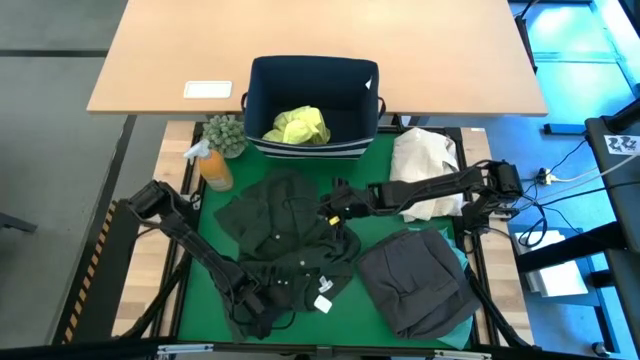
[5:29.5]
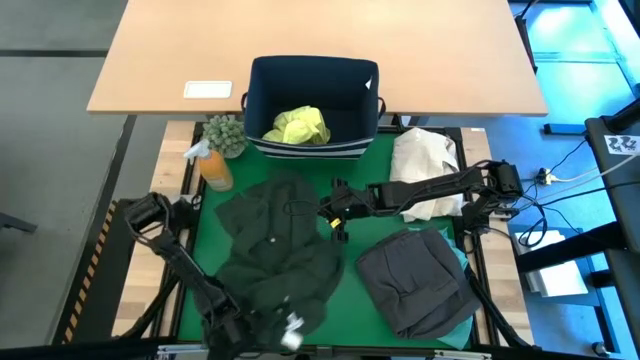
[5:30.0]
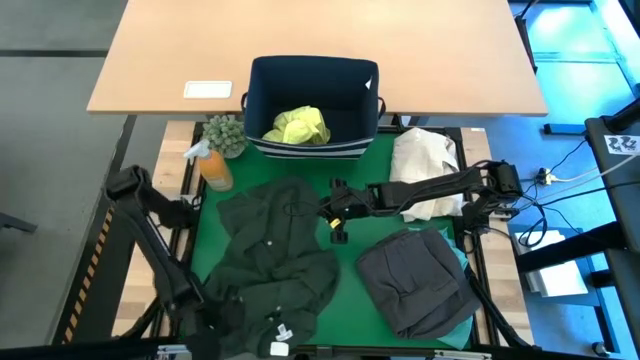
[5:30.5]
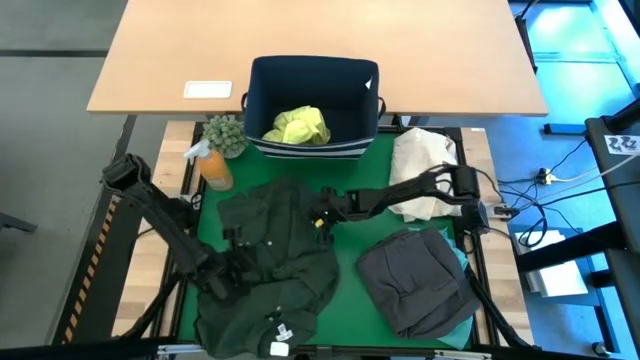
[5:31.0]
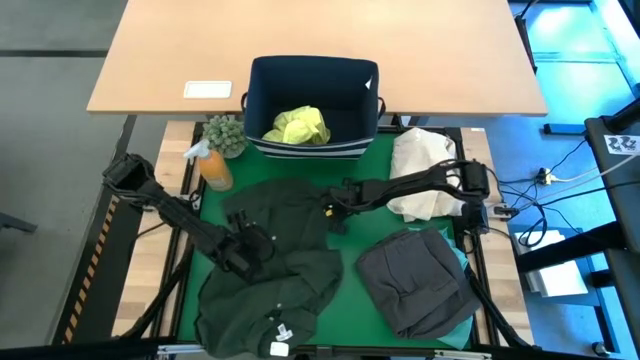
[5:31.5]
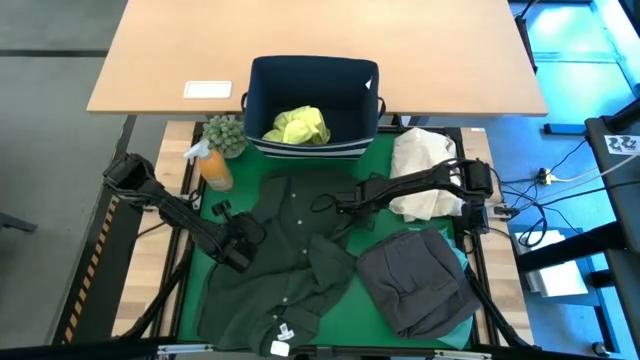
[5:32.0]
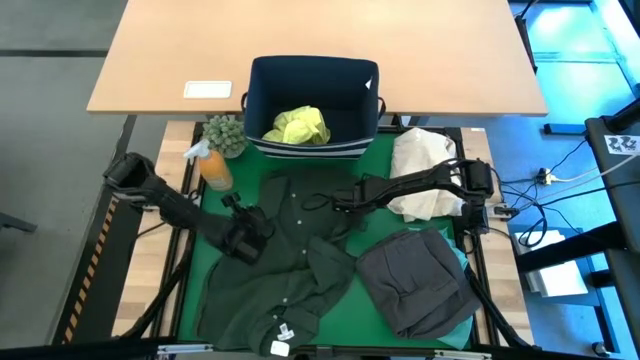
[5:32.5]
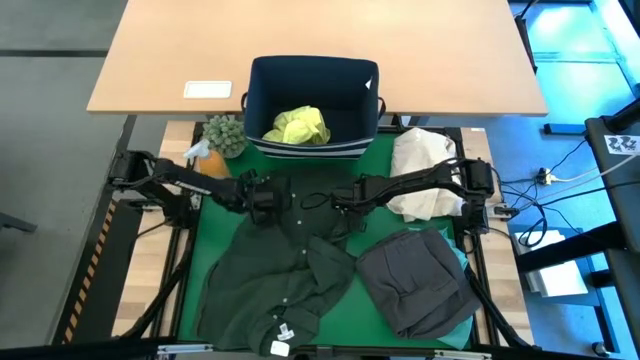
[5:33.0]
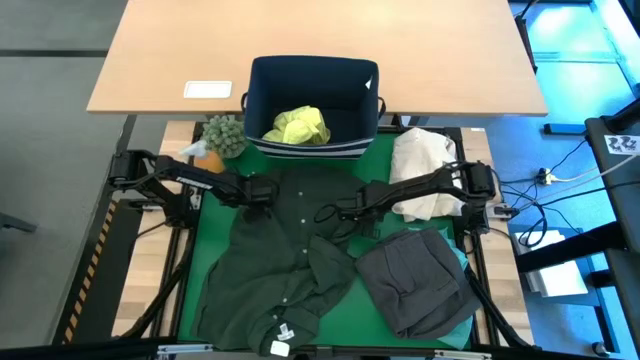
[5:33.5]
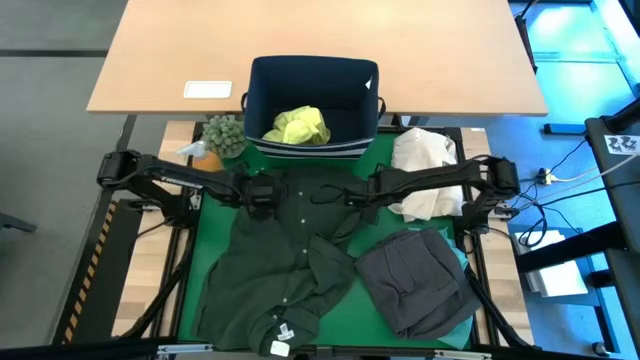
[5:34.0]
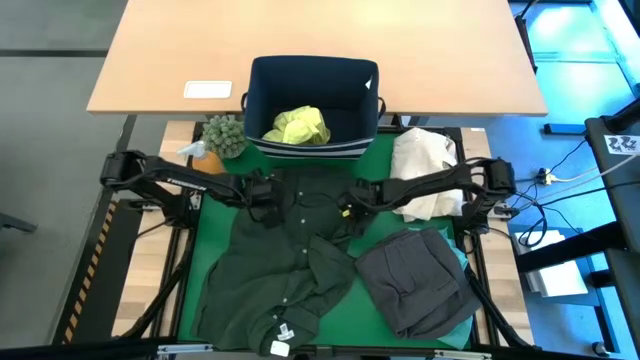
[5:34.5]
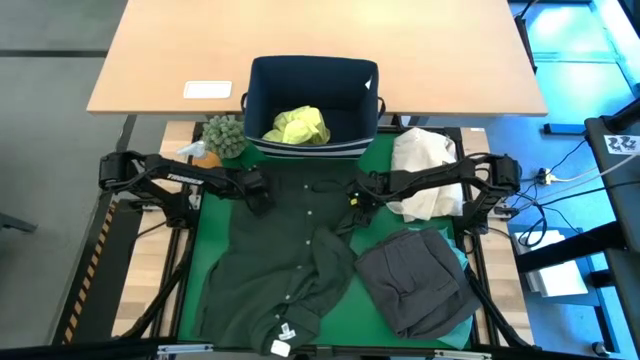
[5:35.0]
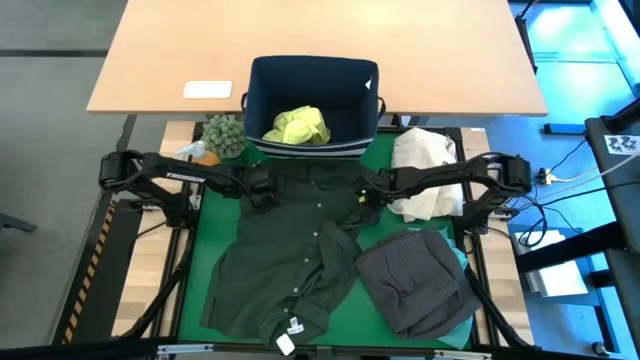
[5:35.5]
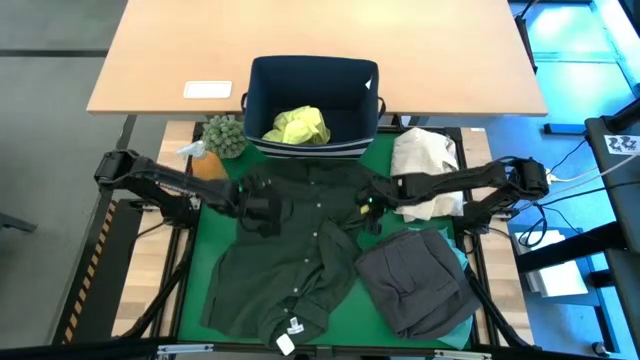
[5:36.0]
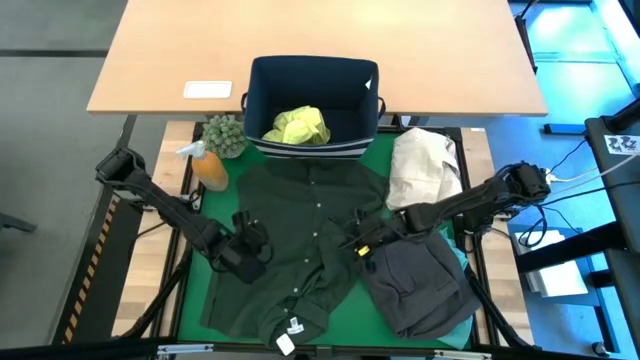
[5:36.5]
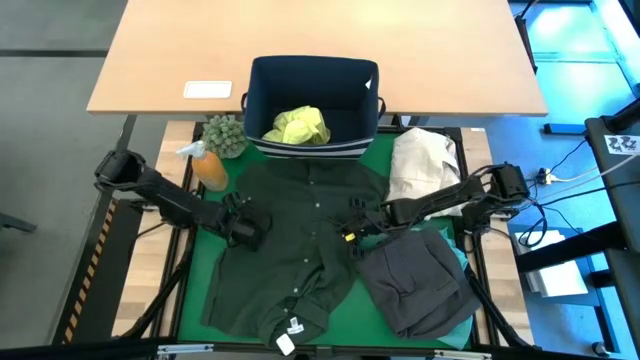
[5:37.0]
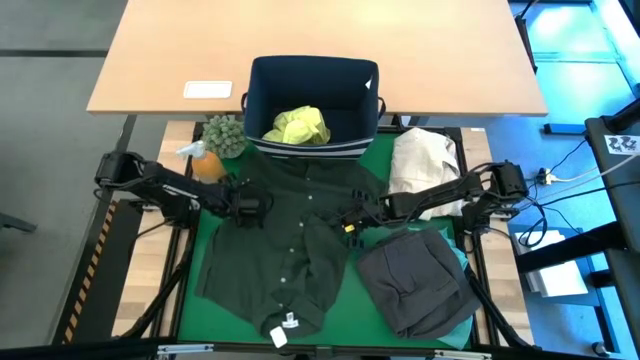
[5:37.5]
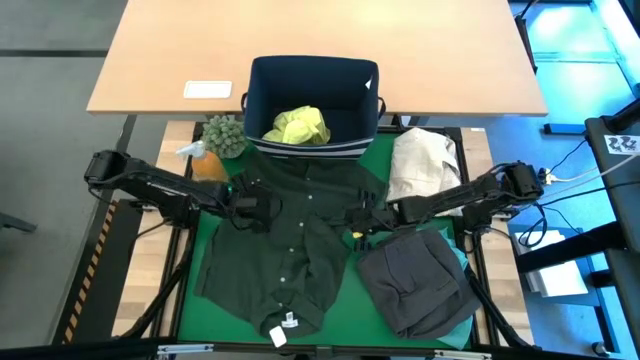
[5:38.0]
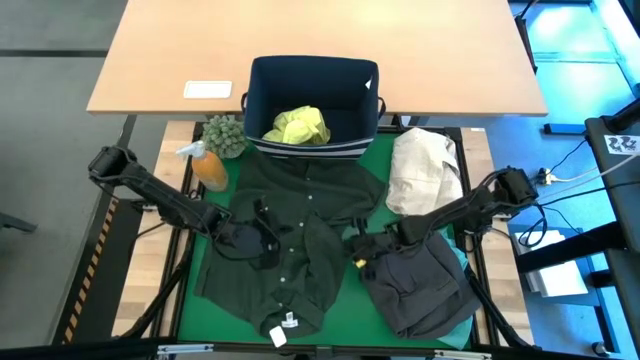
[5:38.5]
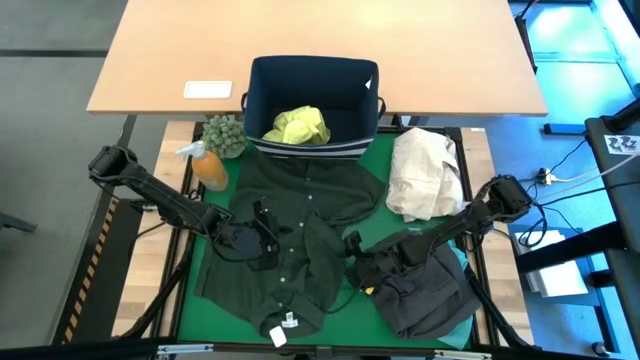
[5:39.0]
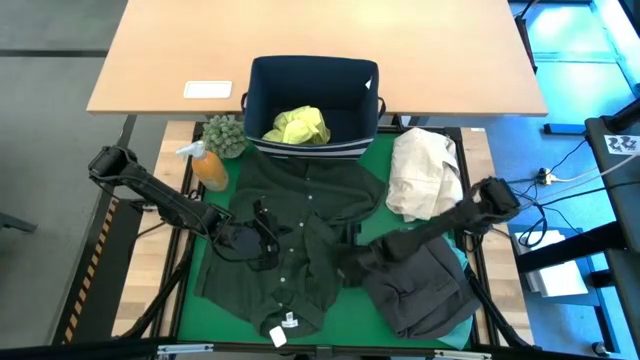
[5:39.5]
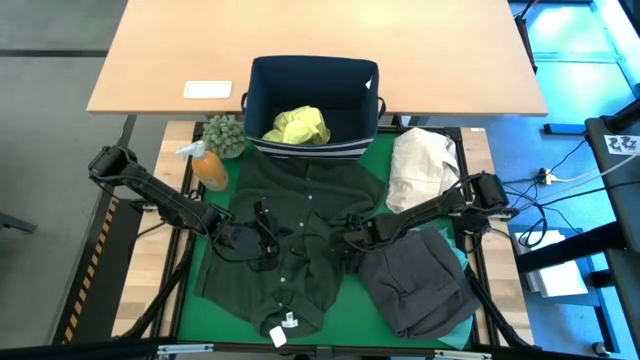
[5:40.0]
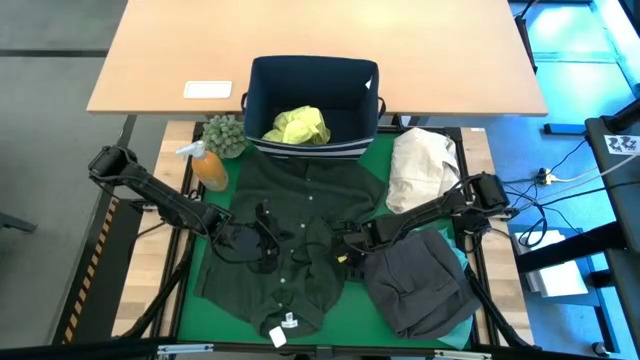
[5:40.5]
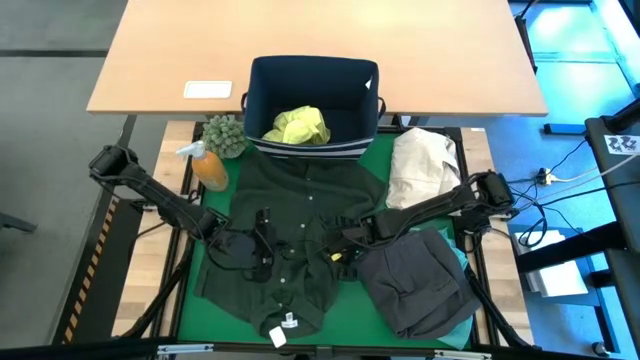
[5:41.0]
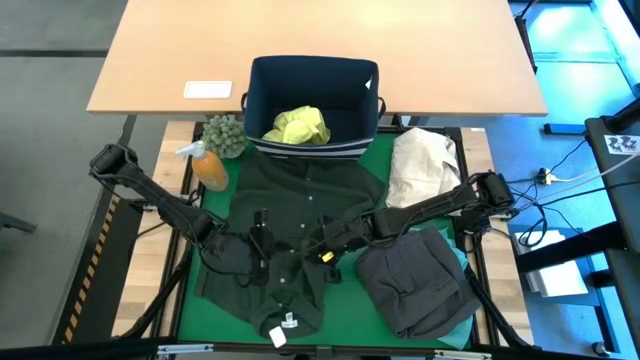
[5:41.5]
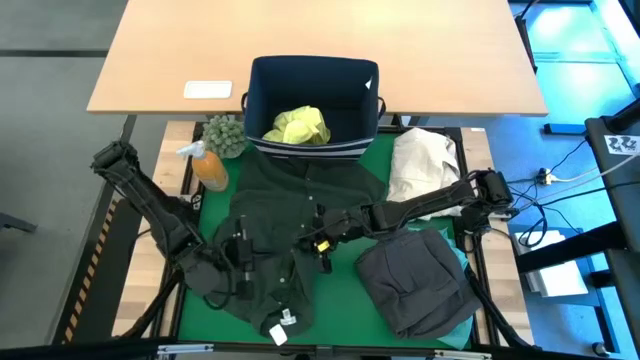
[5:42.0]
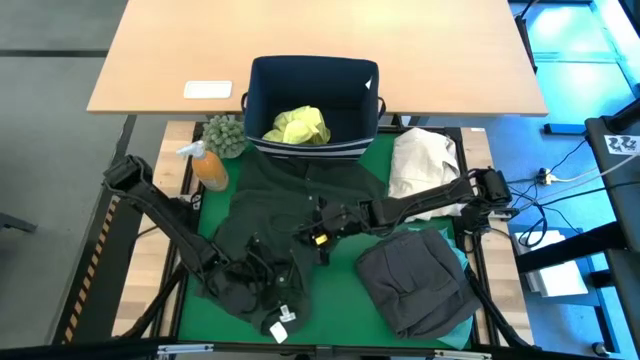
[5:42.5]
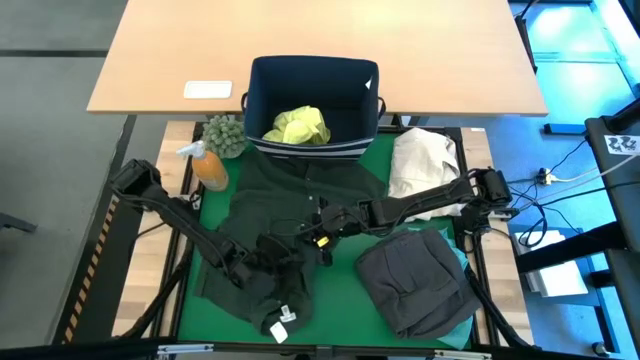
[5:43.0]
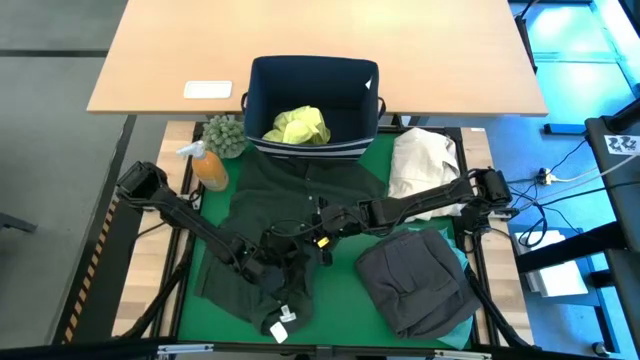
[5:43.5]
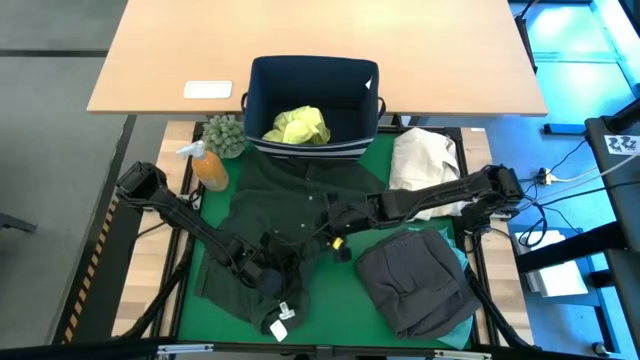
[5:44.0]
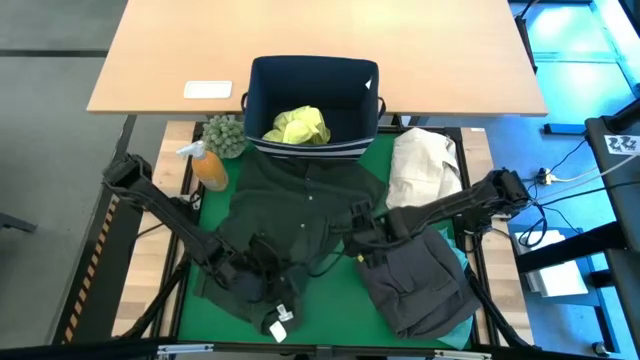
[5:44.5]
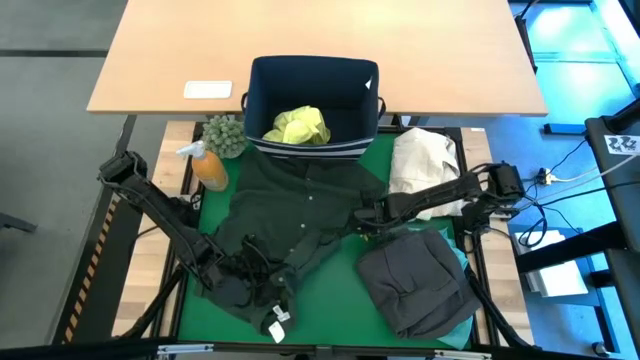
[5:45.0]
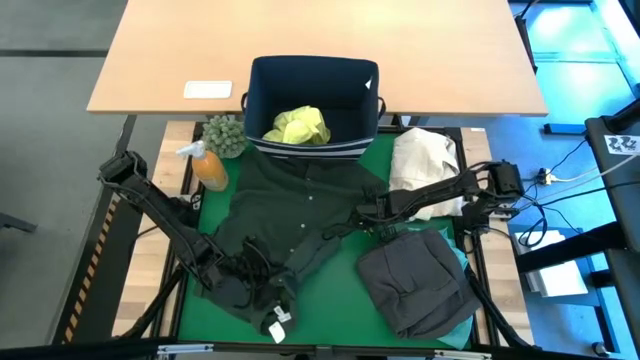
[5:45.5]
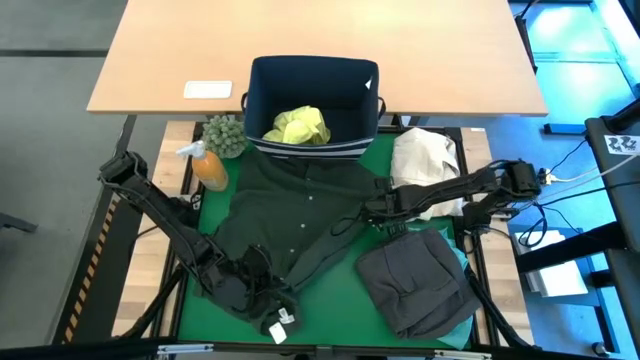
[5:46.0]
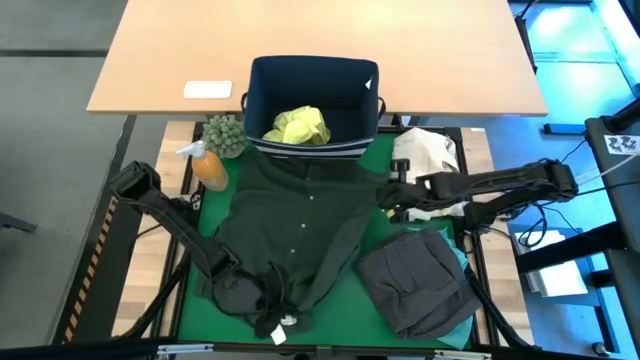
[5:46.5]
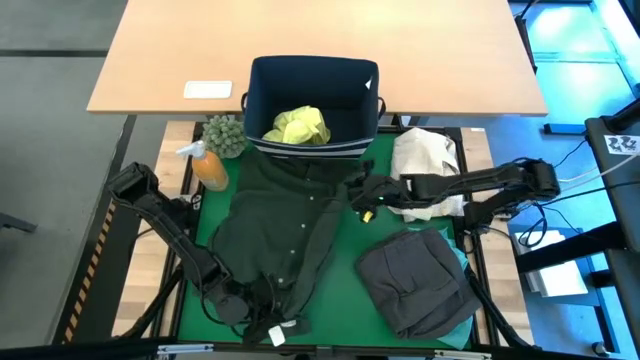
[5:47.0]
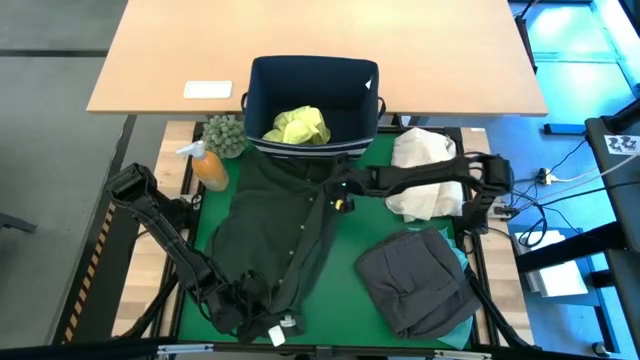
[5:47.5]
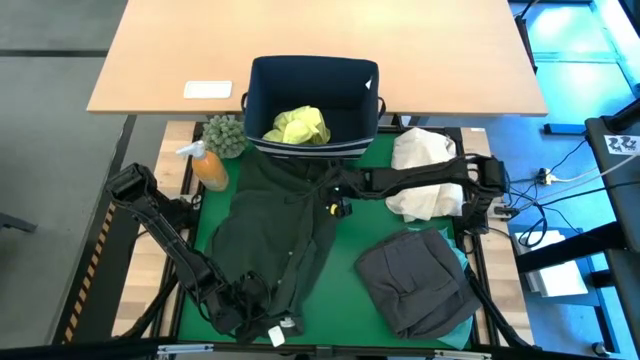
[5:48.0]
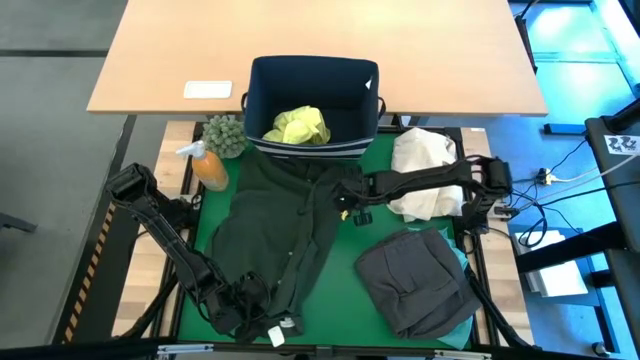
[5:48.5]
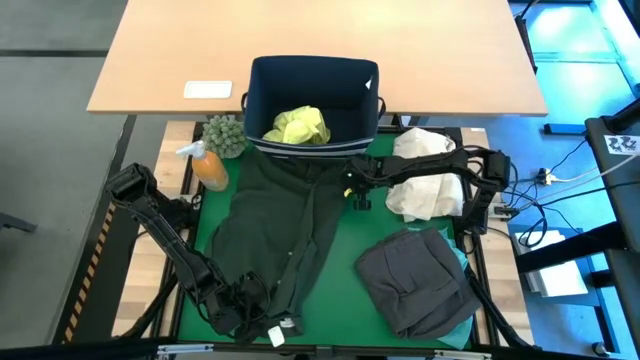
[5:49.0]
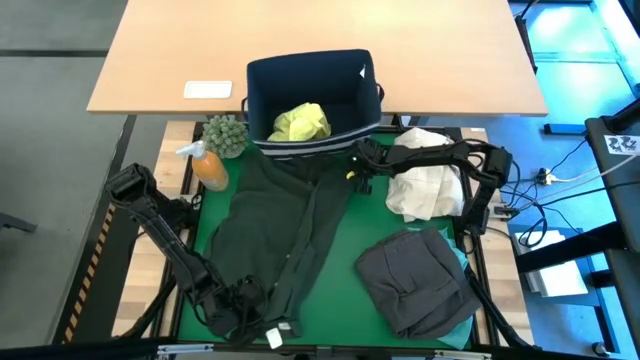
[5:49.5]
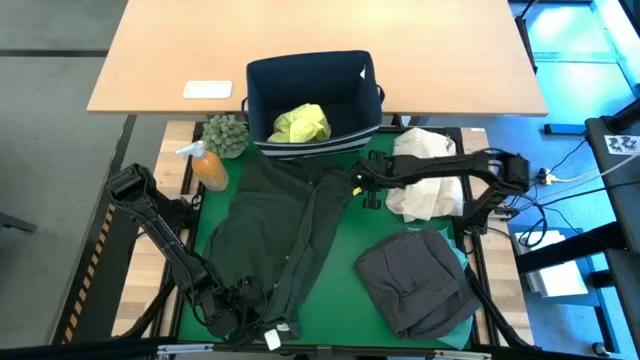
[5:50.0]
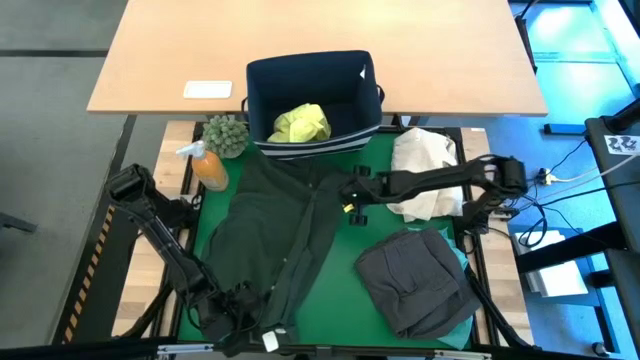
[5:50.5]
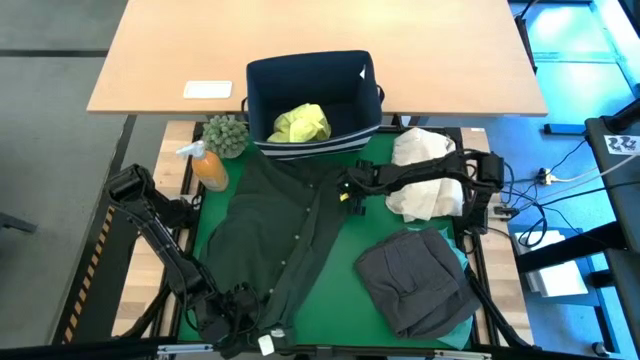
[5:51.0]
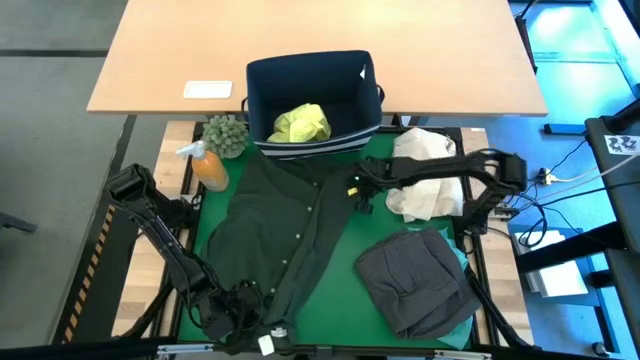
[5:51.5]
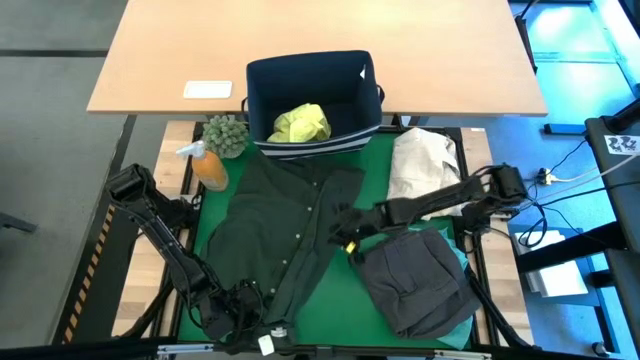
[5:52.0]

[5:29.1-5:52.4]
Task: Fold laundry
Fold the green polo shirt
